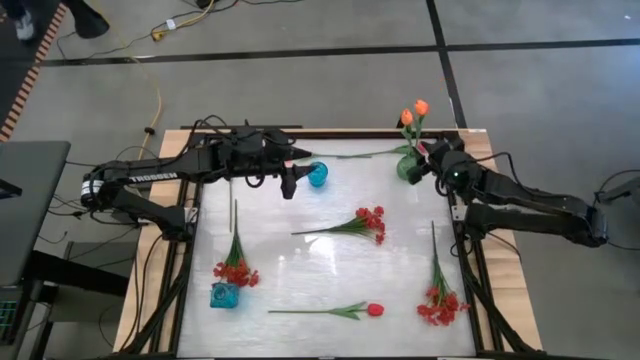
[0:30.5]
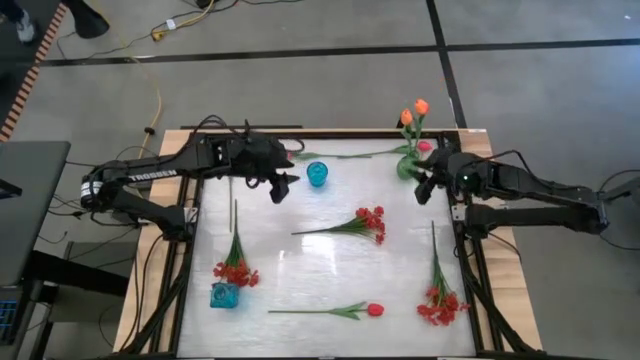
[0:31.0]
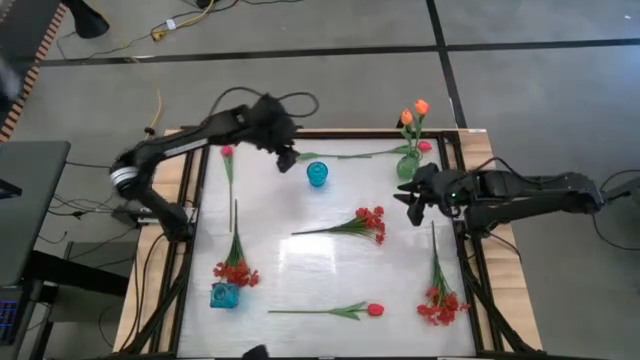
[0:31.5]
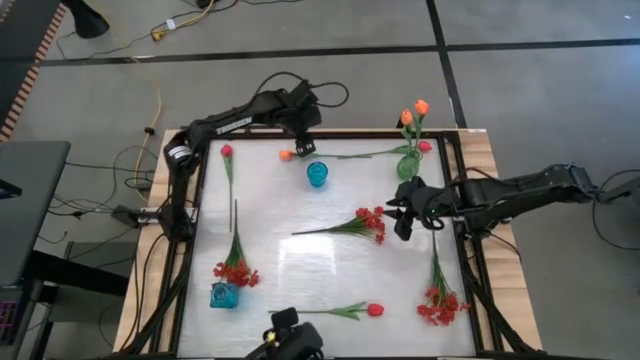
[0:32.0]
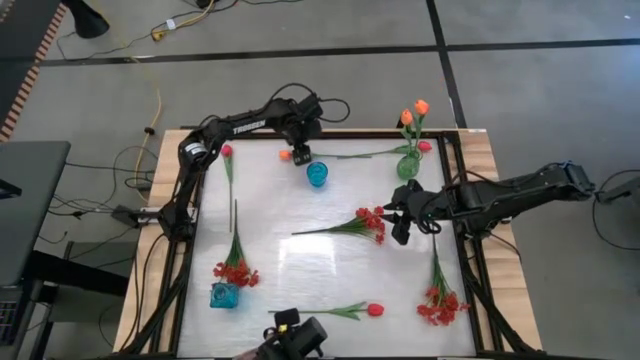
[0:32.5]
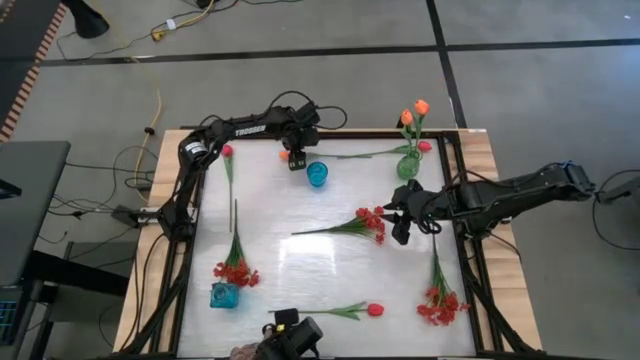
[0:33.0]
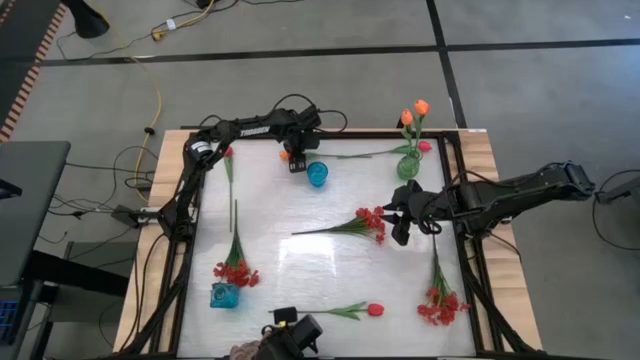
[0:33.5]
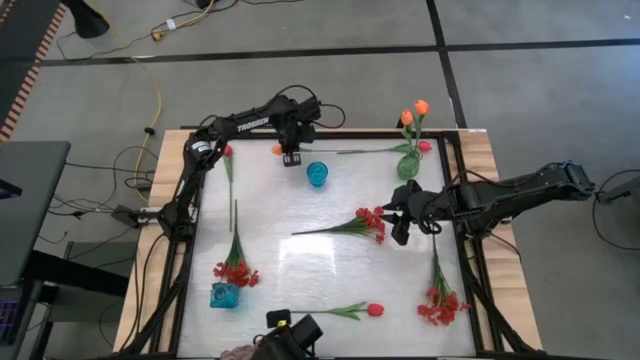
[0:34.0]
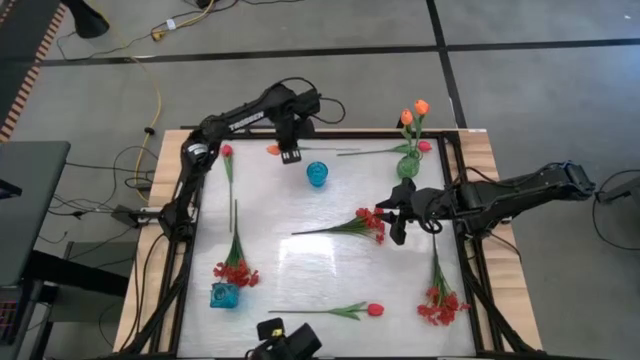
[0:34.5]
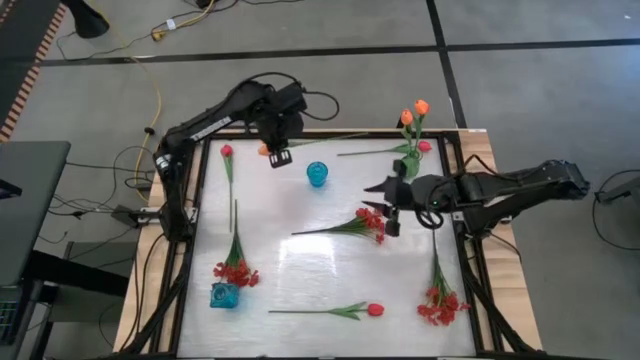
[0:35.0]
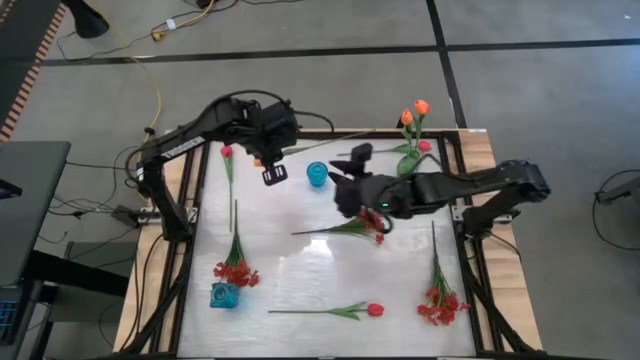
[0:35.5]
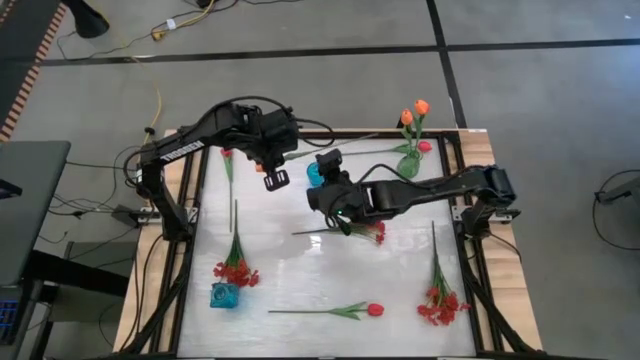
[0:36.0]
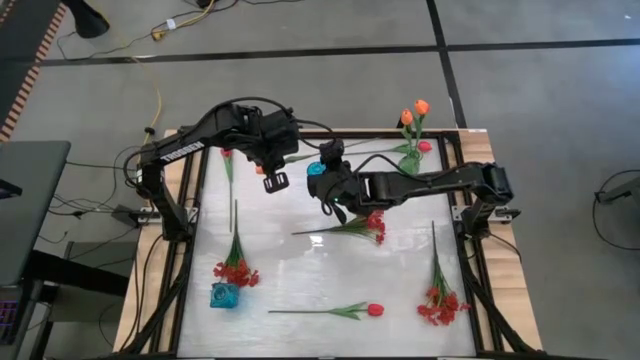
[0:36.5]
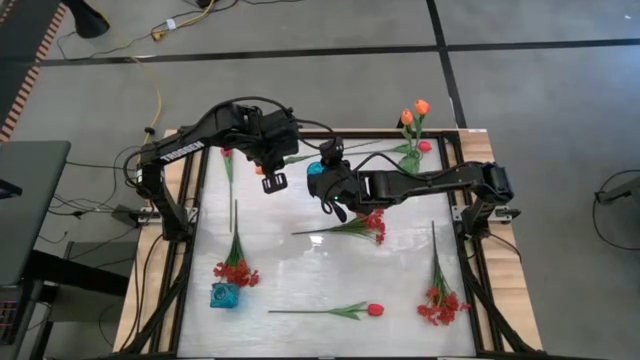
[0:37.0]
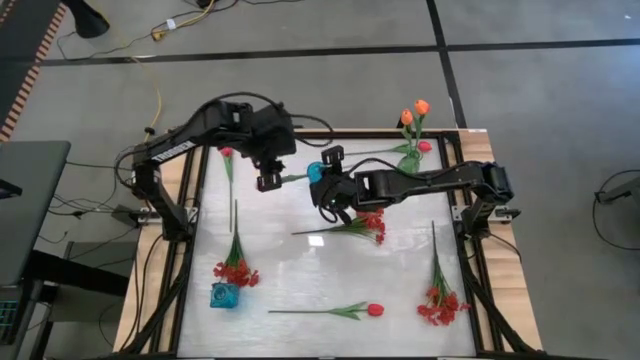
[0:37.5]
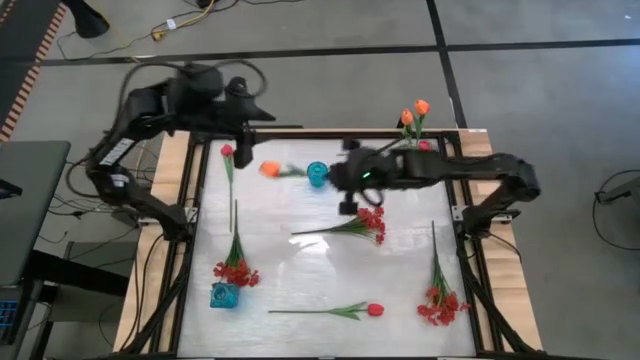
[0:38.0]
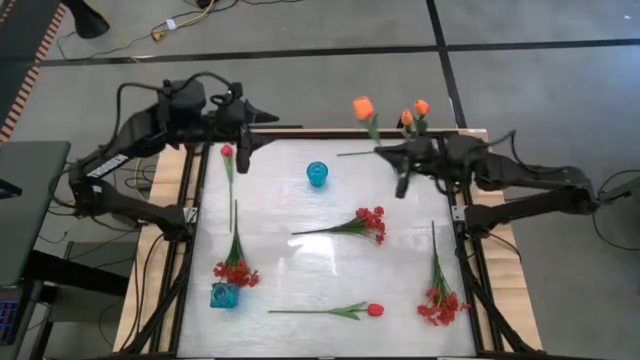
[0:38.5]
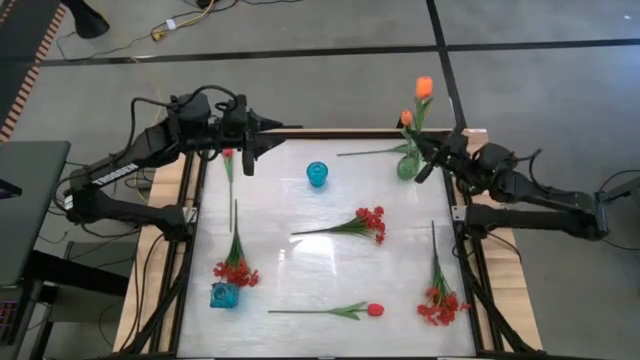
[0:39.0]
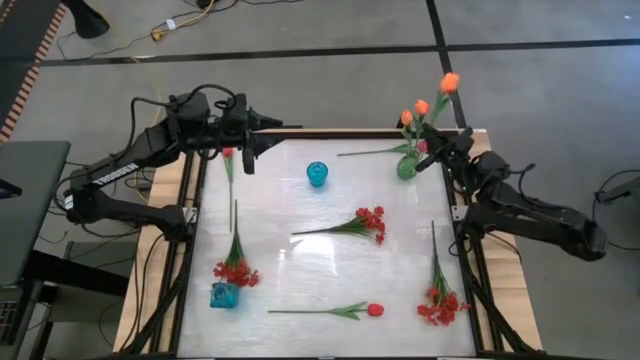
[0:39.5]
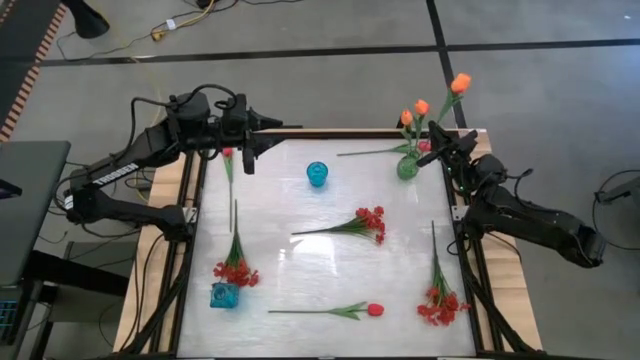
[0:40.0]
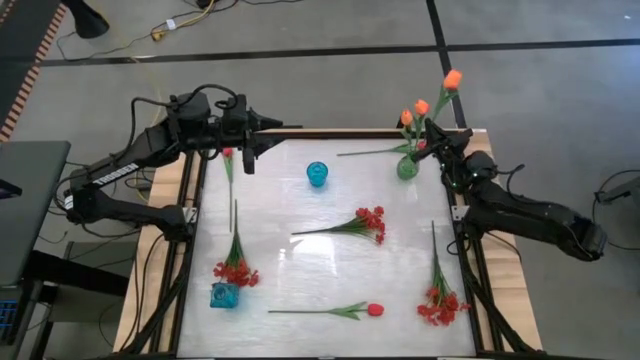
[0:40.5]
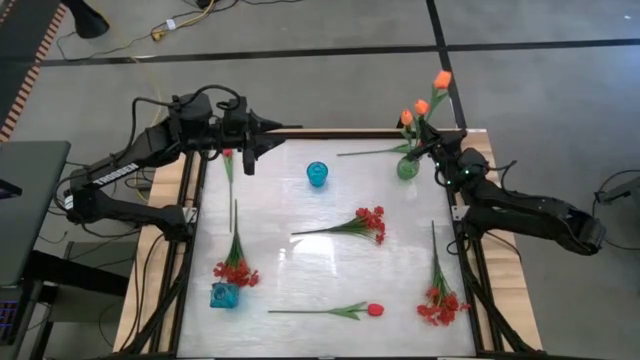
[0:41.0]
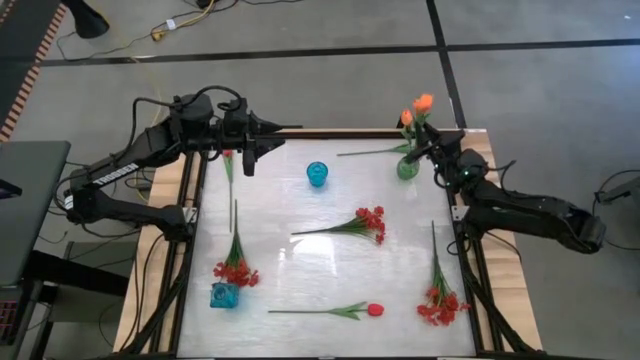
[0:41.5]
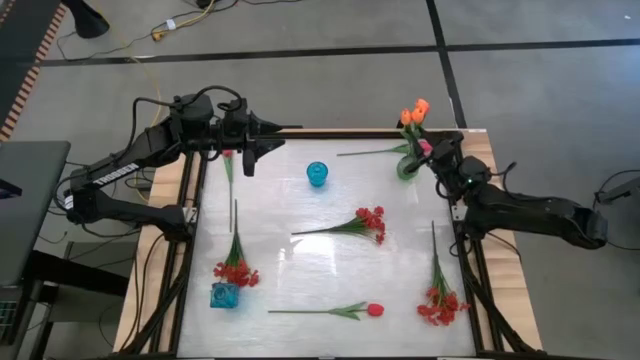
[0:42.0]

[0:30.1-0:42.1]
Task: Sort flowers into vase by color
Put the orange tulip into the green vase

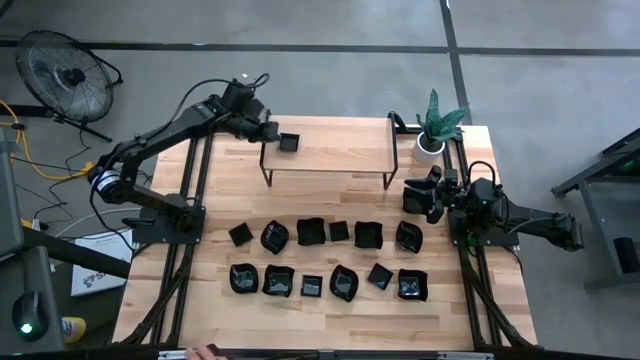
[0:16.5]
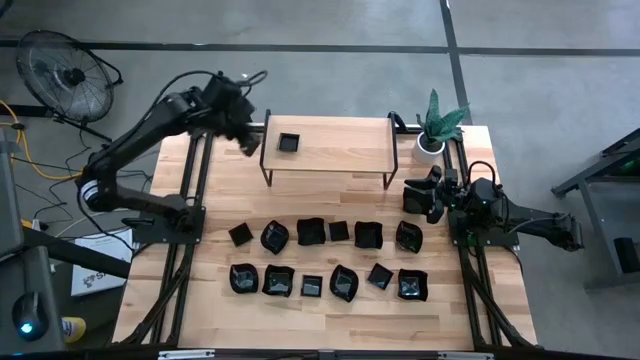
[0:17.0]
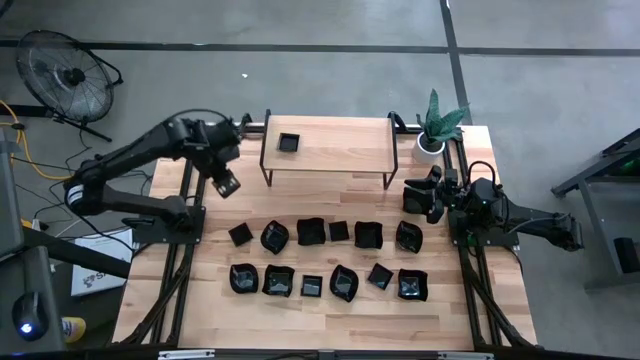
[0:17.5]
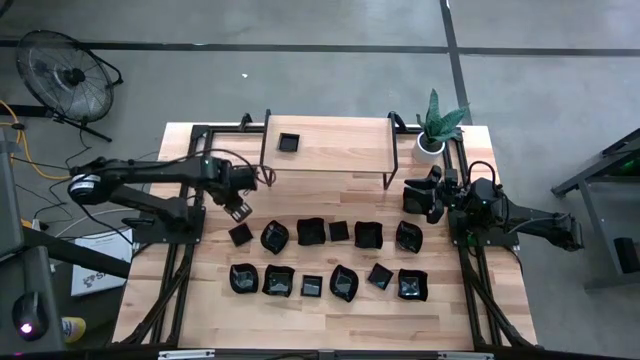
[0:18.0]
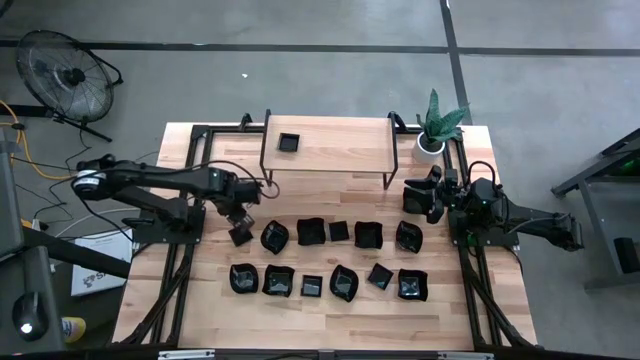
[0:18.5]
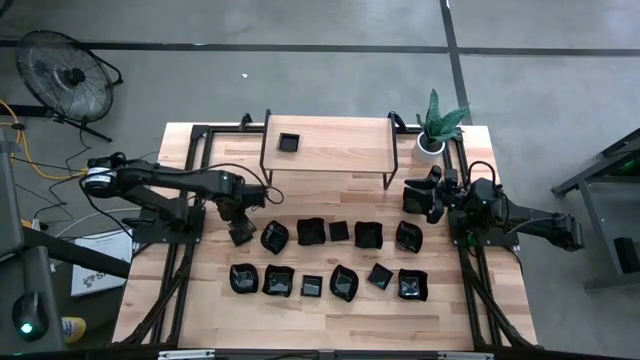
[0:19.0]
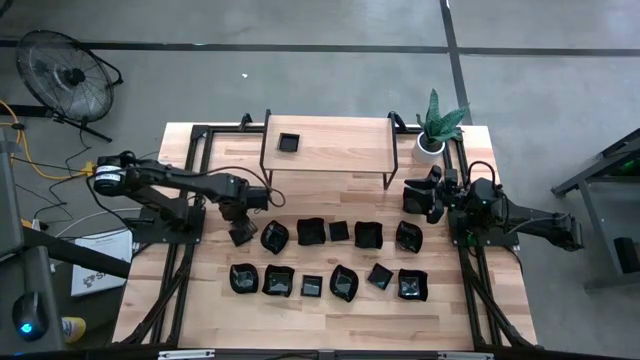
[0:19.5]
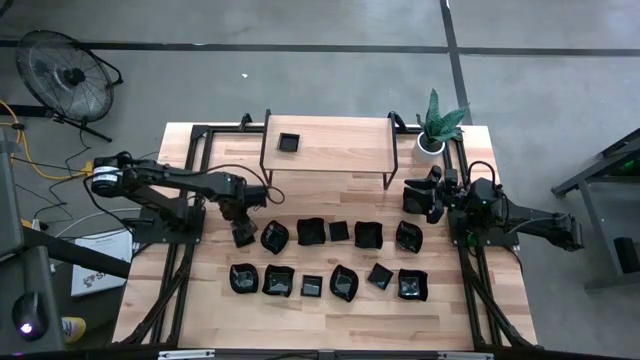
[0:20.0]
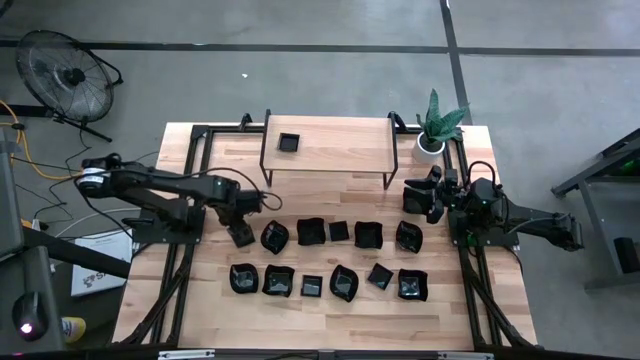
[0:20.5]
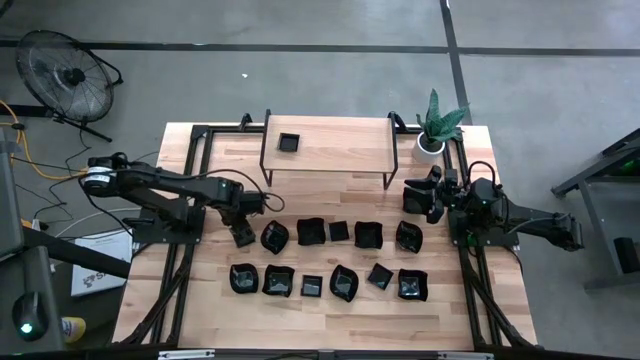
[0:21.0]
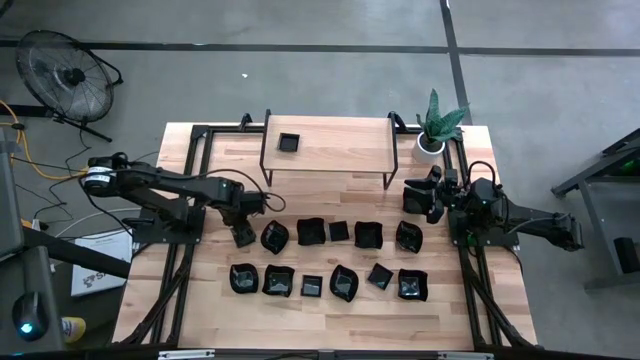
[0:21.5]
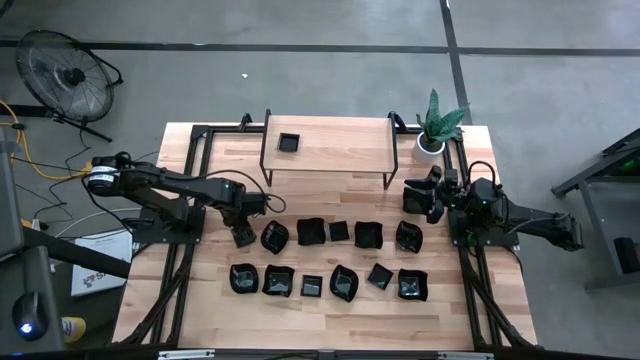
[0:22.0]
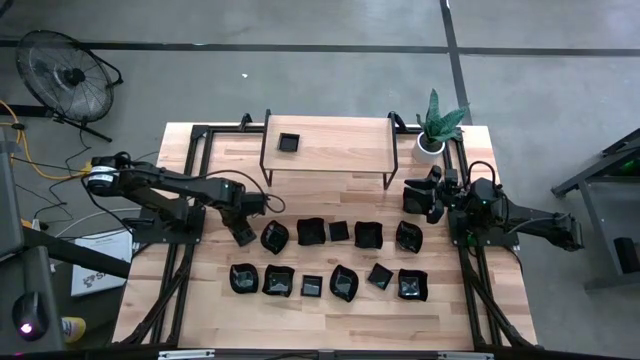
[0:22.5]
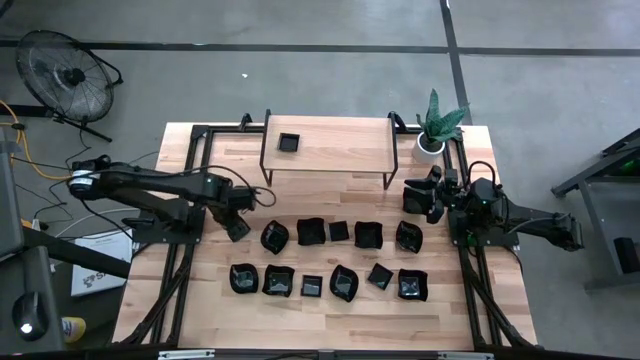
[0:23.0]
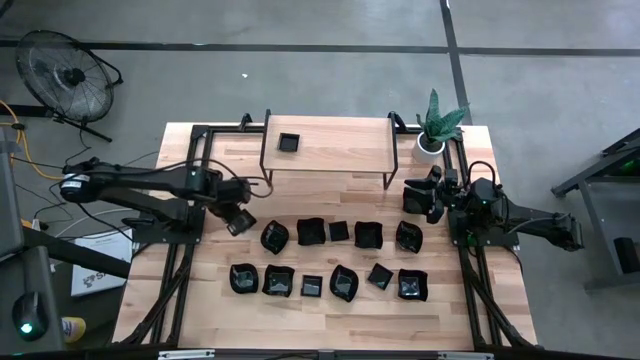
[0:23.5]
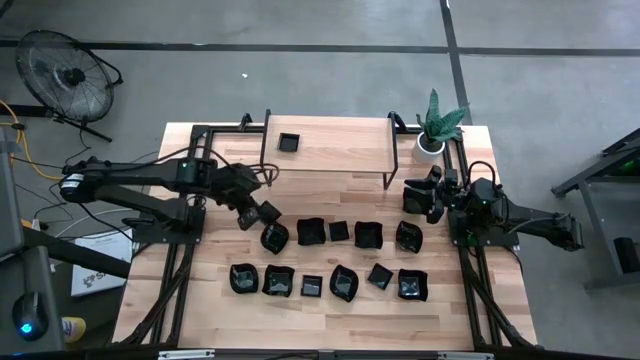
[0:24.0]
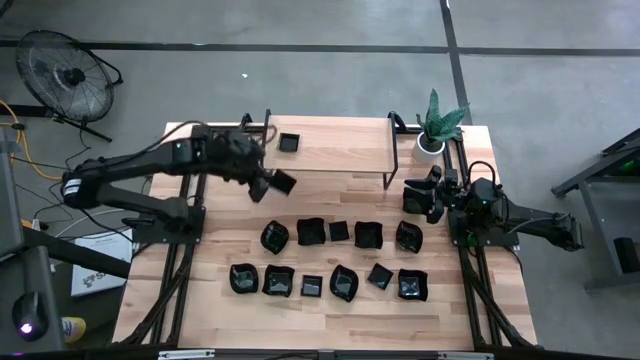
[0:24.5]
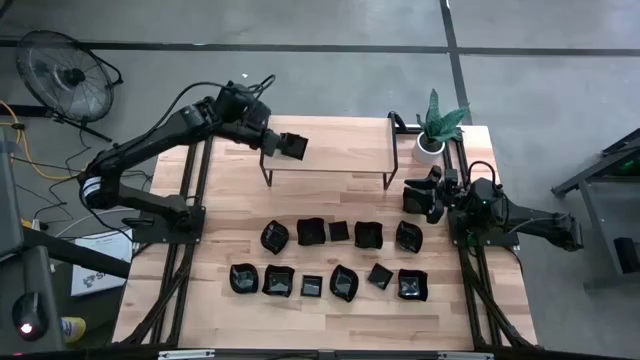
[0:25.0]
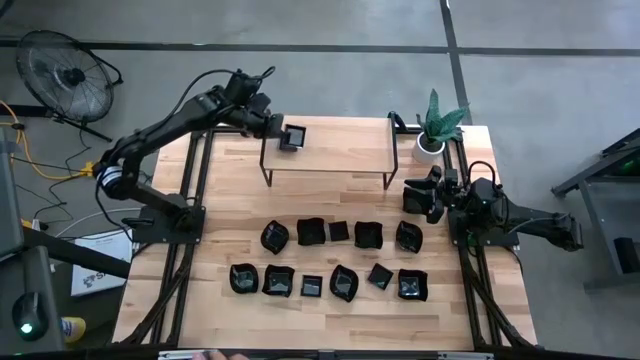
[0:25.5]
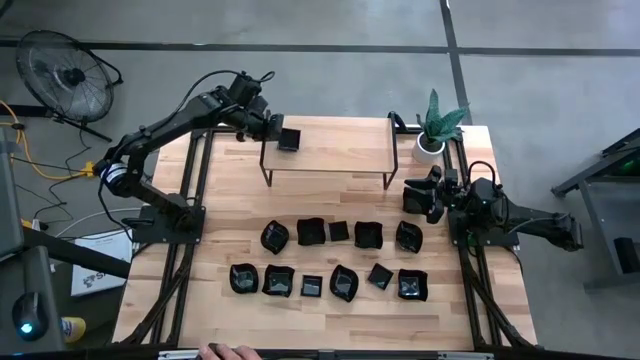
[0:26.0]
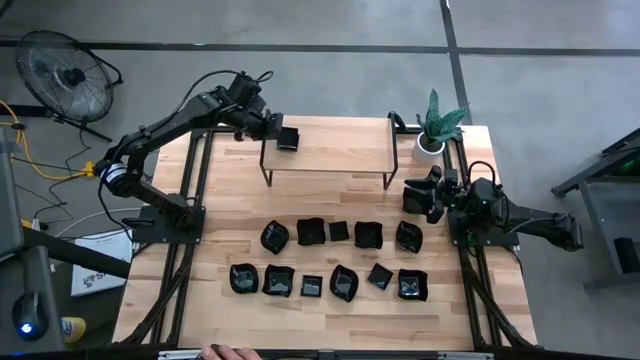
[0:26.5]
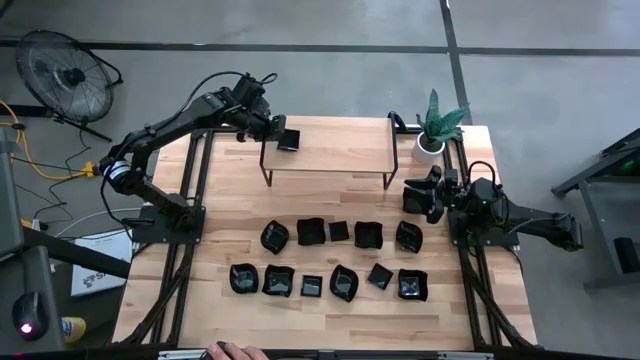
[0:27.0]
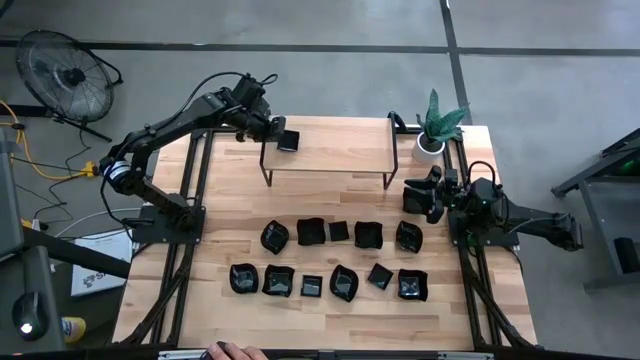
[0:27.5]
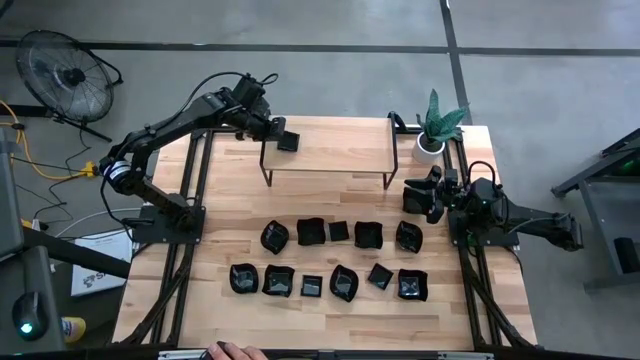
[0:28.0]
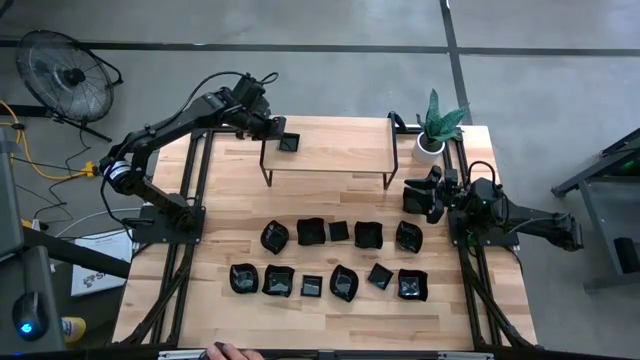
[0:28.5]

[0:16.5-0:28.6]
Task: Pick & Place Mini shaped plates
Stack the black square plate on top of the black square plate on the shelf
